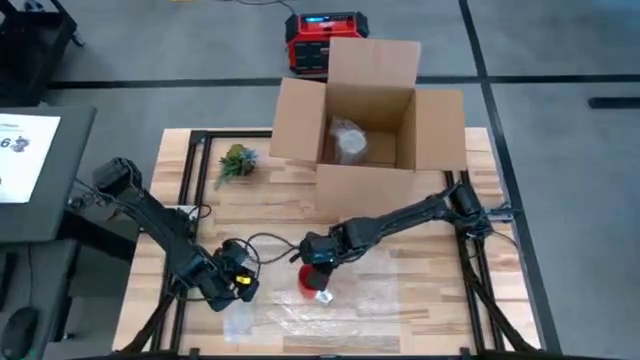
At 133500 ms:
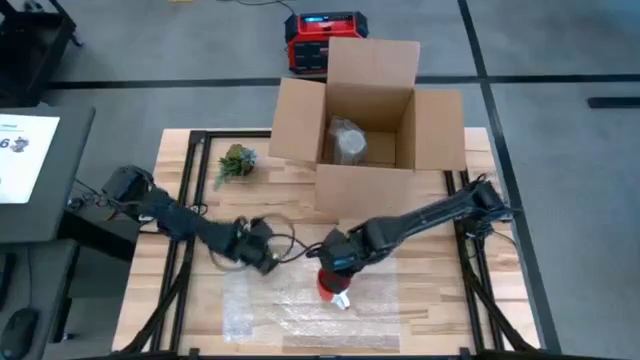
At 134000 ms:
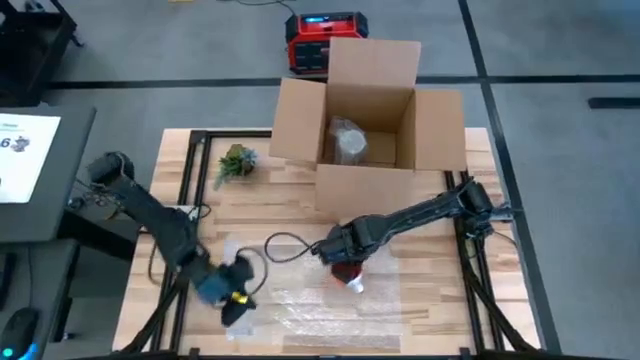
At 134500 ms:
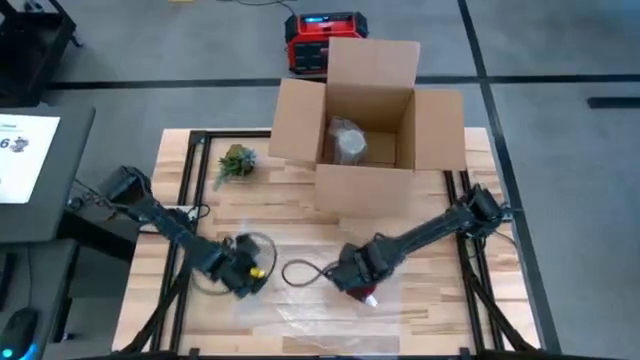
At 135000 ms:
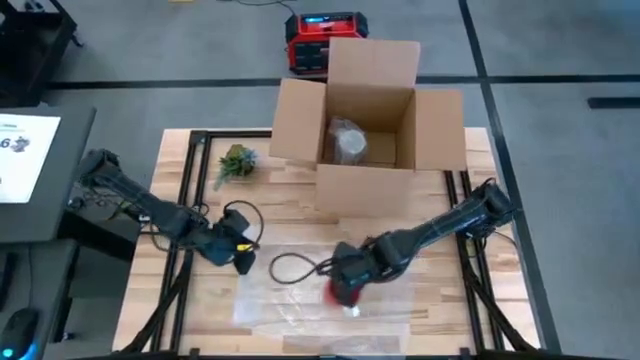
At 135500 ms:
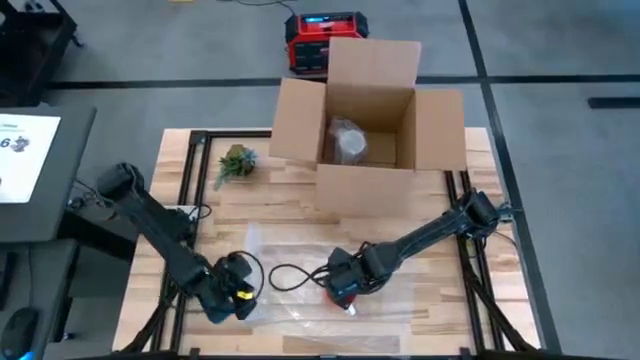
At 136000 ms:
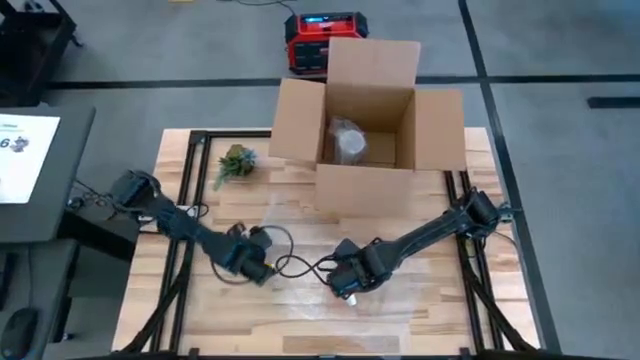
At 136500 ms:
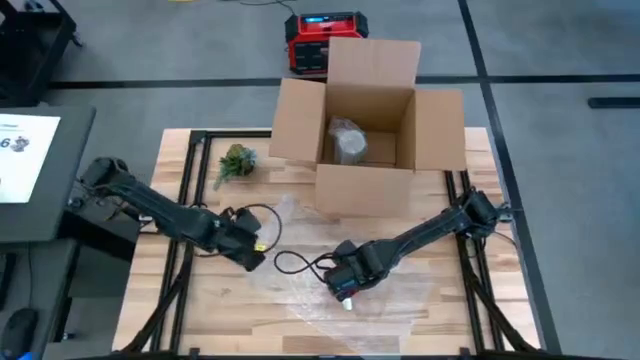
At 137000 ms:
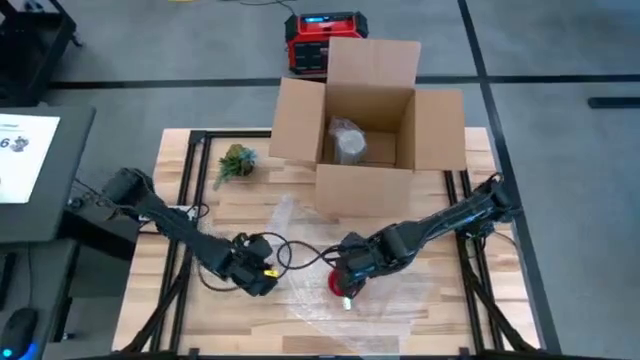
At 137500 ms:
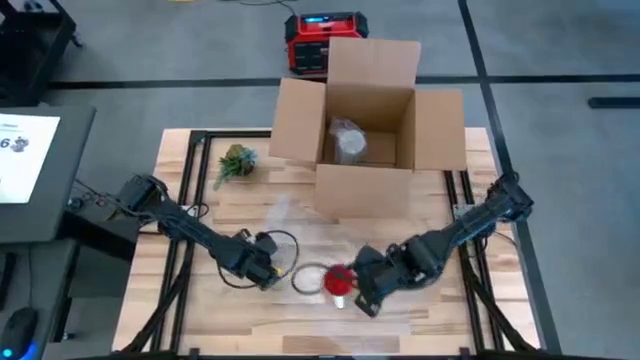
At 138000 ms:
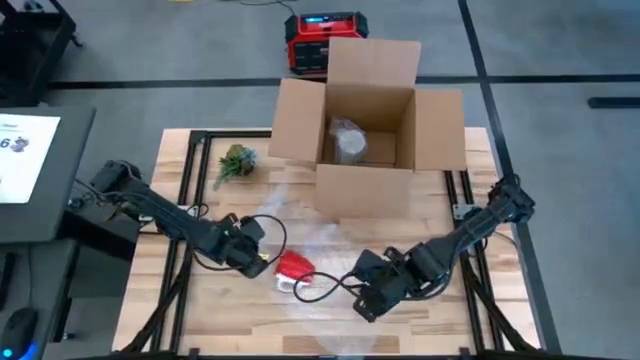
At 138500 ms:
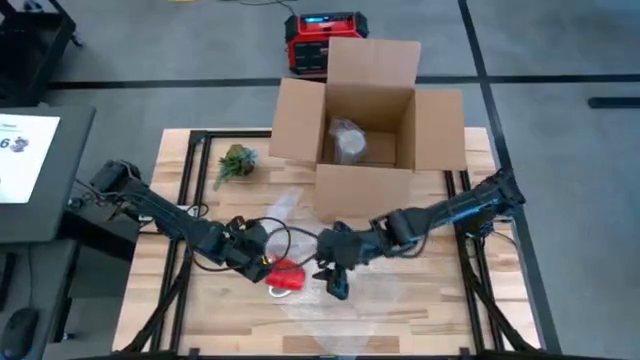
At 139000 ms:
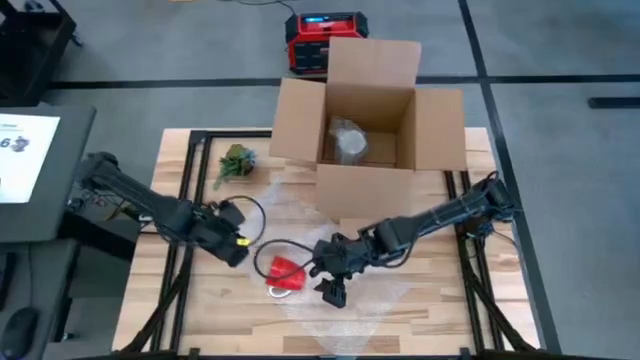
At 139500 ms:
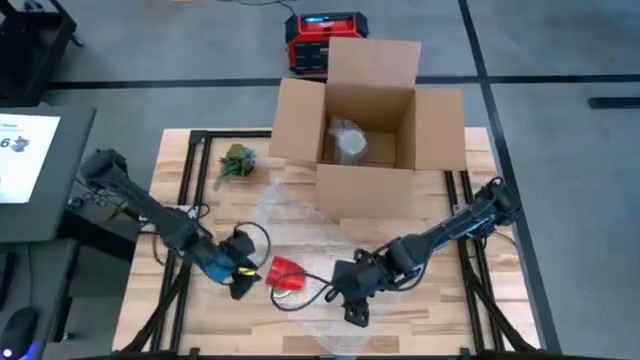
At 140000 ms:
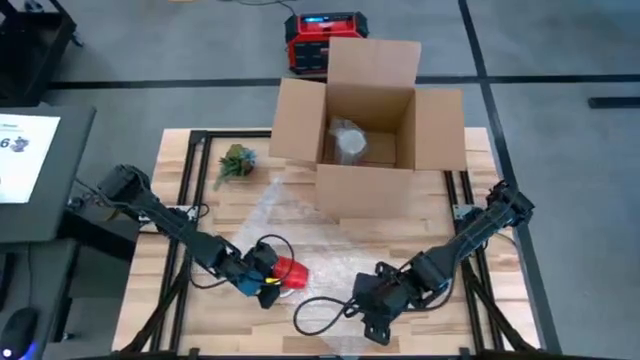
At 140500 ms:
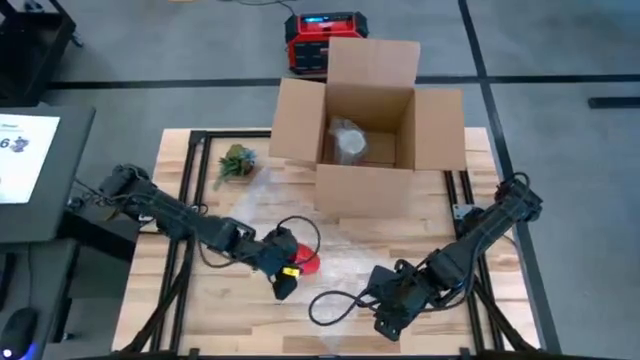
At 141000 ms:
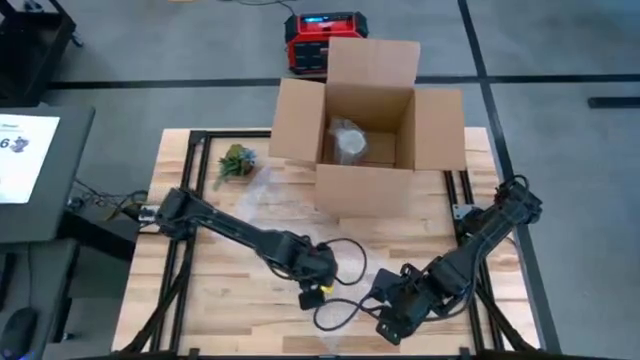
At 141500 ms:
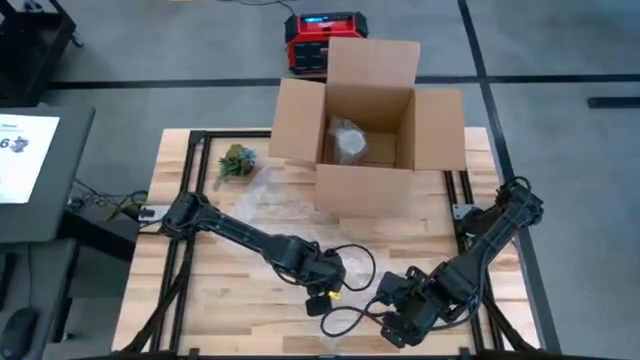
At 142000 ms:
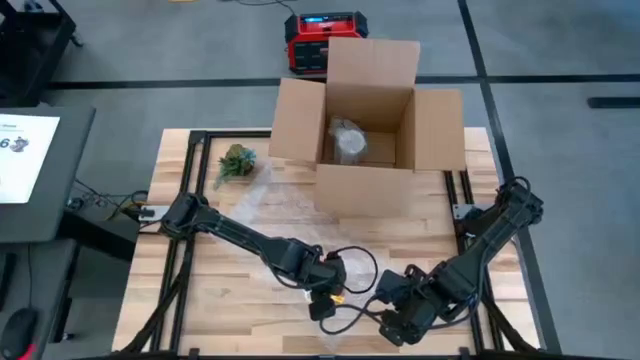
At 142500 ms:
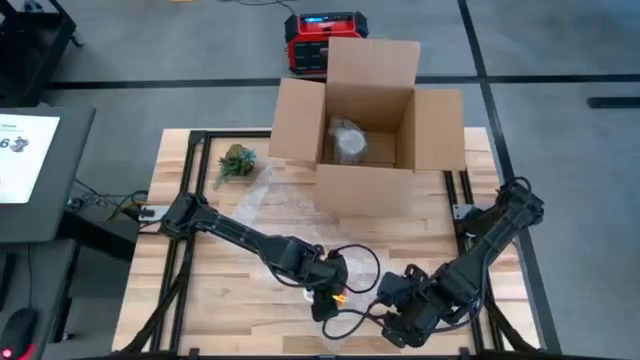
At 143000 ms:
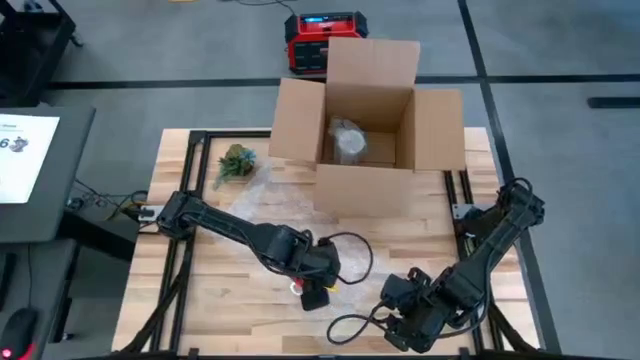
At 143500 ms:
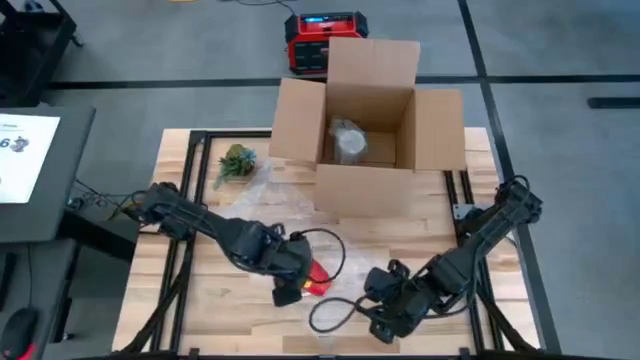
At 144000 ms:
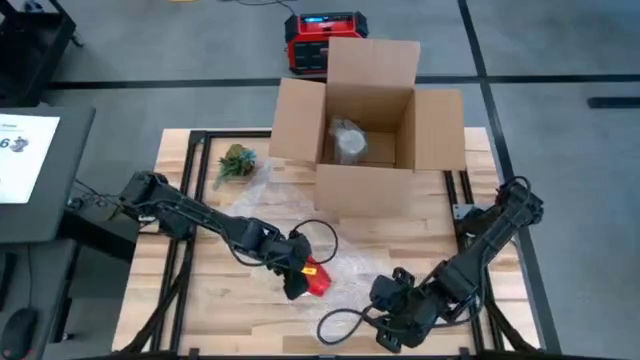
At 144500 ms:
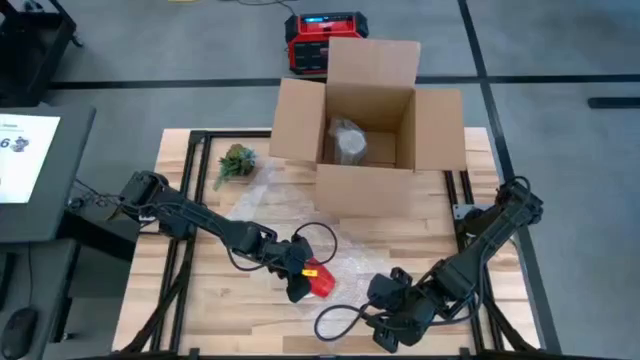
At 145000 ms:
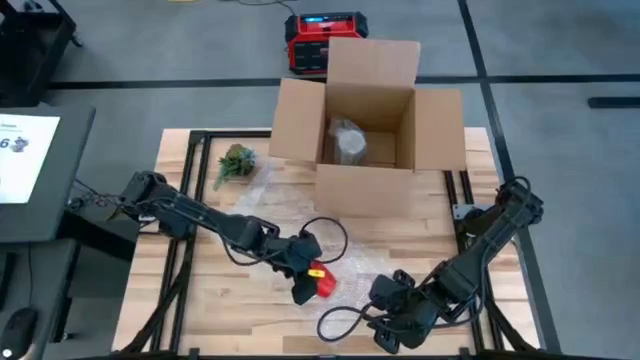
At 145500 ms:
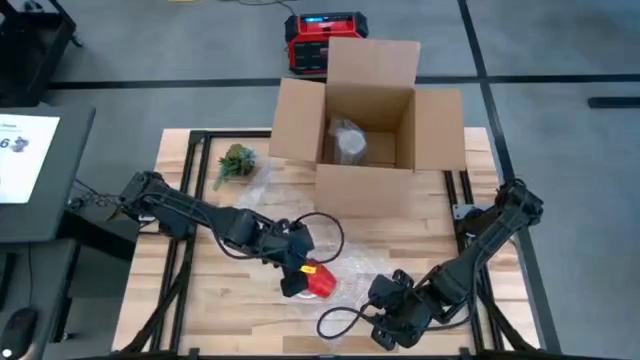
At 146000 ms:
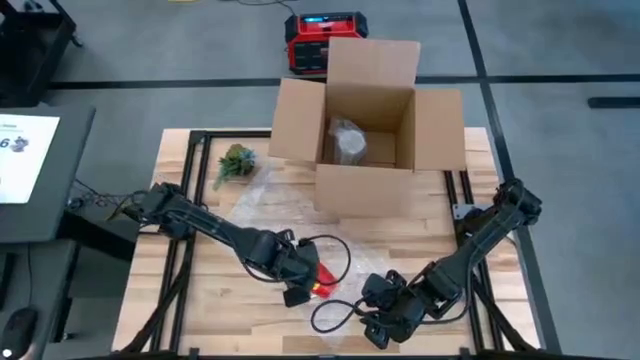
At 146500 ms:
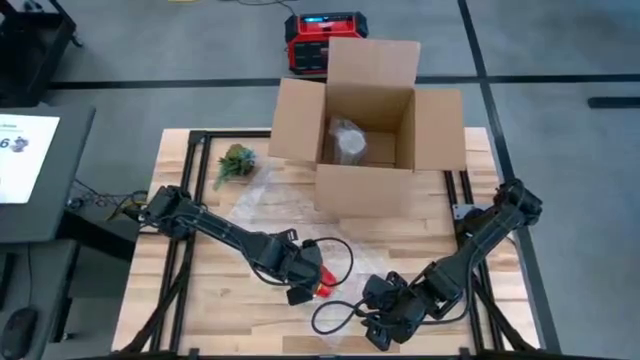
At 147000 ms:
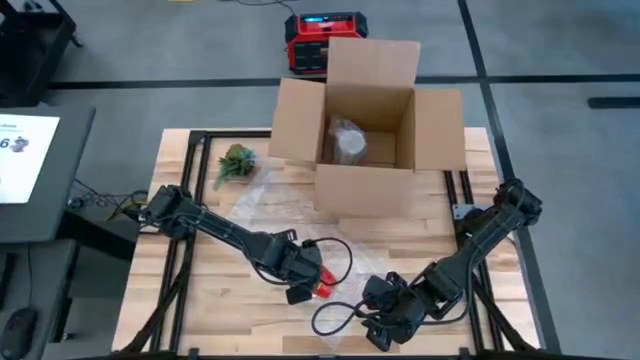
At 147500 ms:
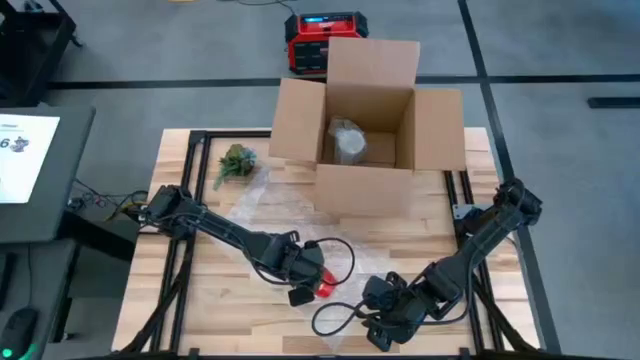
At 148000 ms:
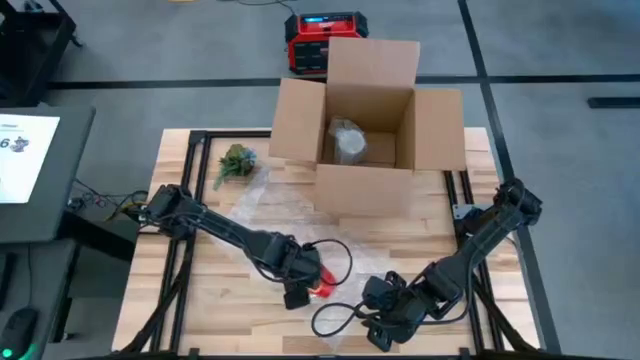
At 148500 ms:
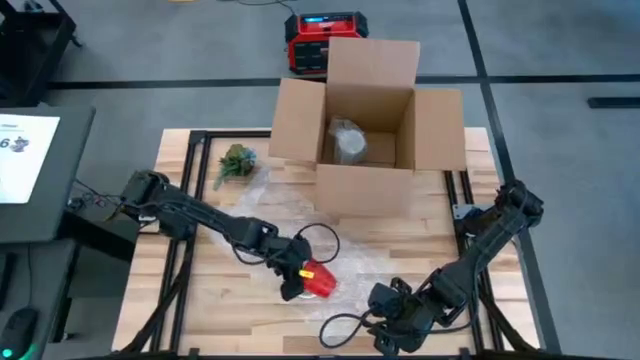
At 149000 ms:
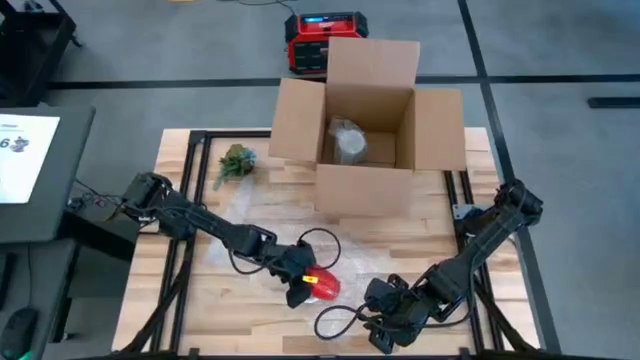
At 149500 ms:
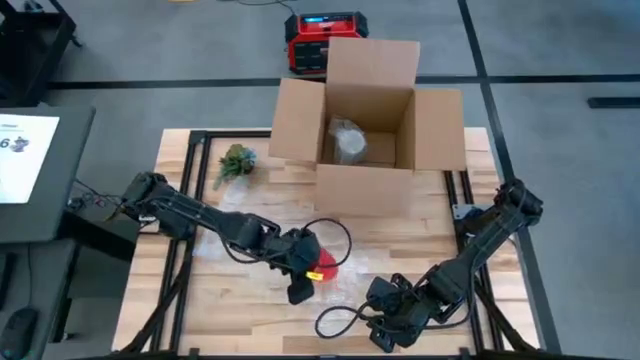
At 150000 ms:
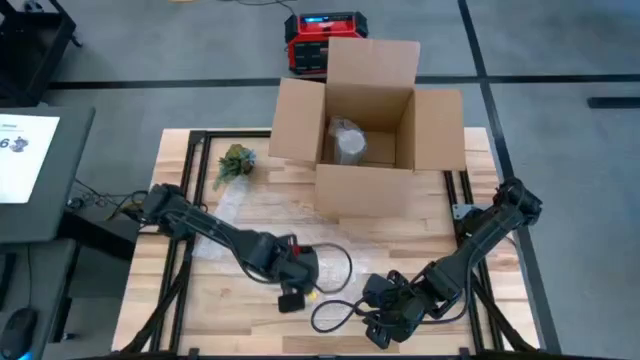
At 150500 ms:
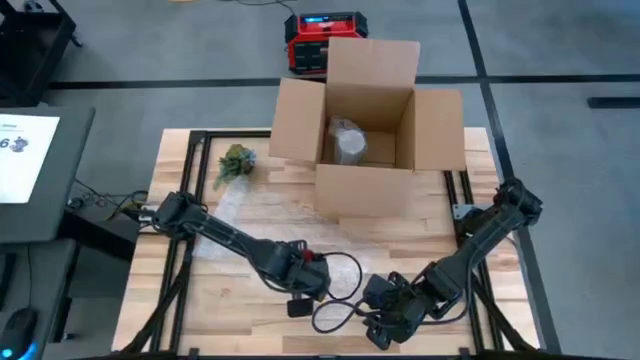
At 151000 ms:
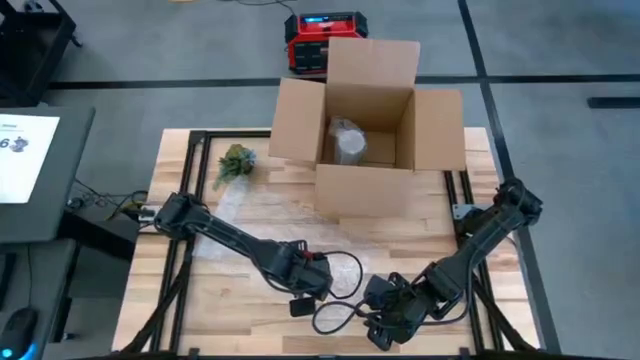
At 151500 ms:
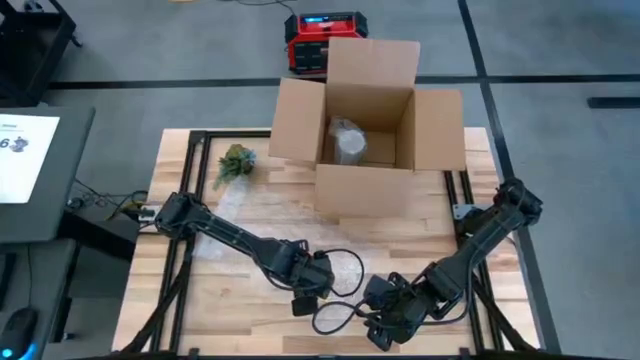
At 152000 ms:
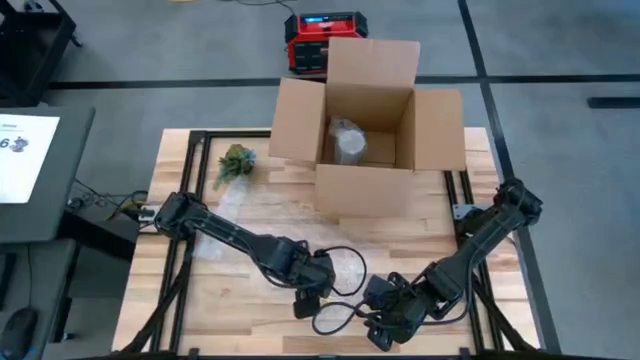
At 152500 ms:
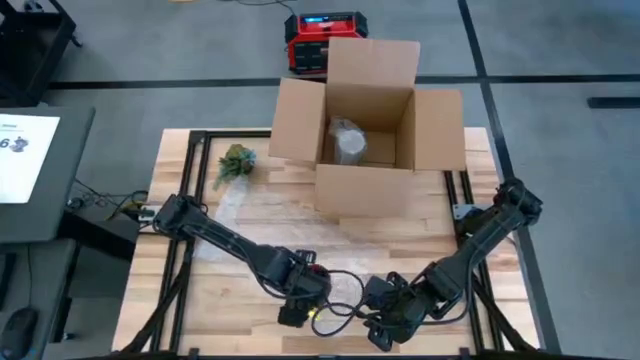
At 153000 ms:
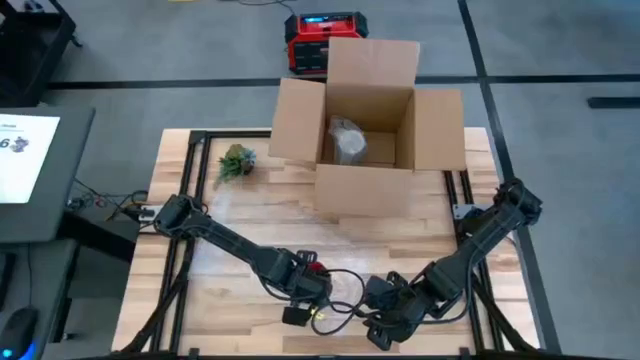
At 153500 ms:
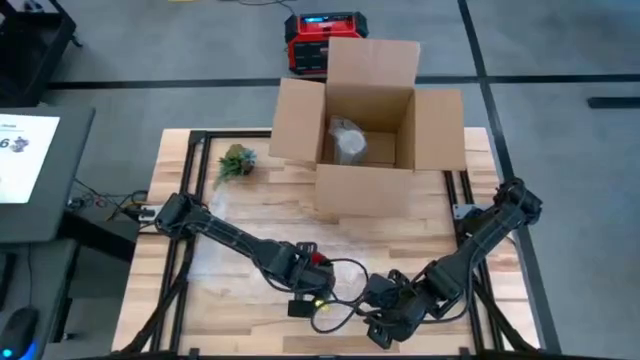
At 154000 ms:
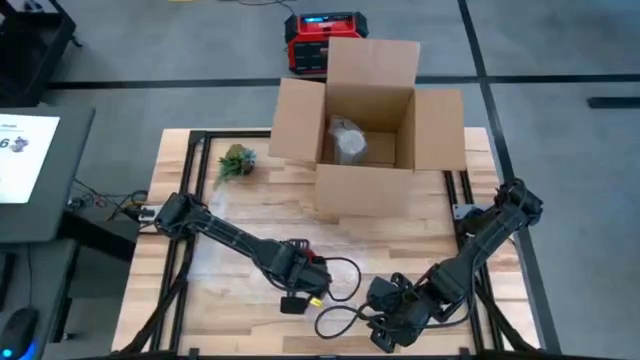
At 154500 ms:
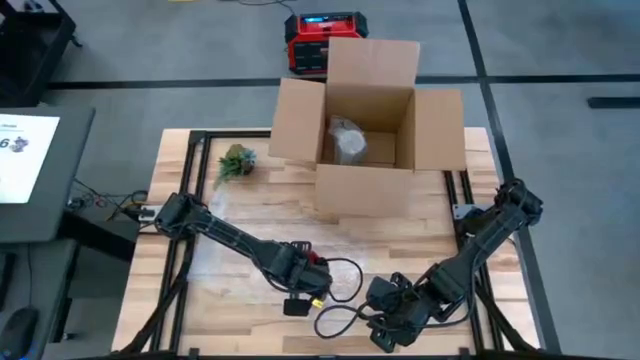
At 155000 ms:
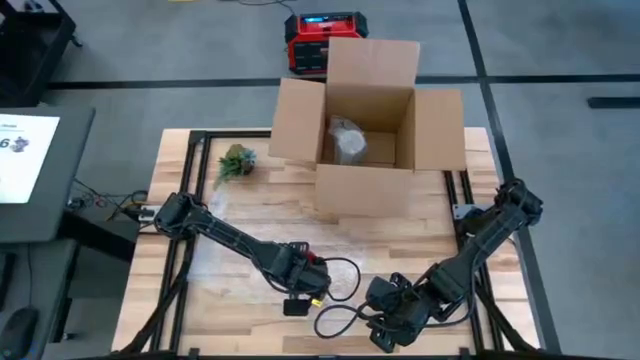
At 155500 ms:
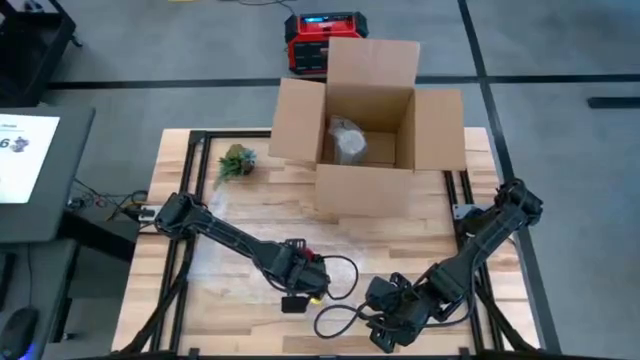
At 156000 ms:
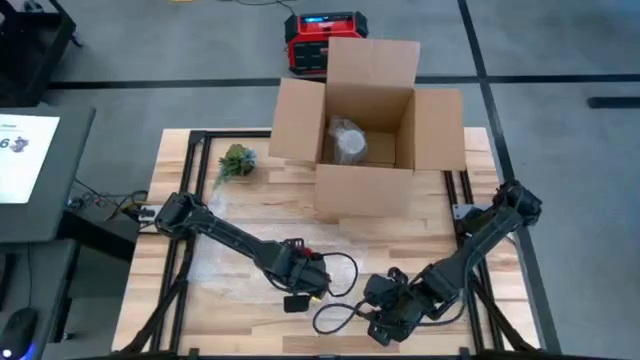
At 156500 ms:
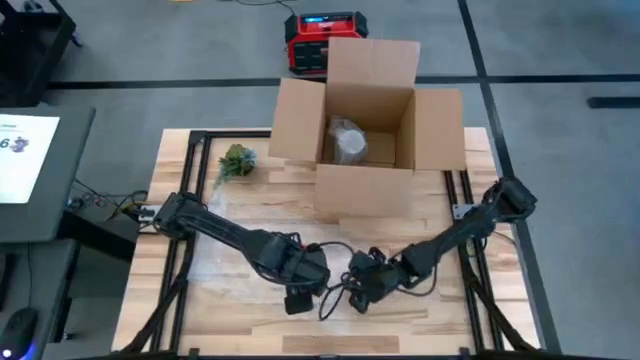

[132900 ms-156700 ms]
Task: wrap mug
Wrap the red mug in the bubble wrap
